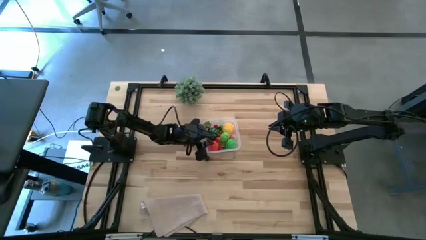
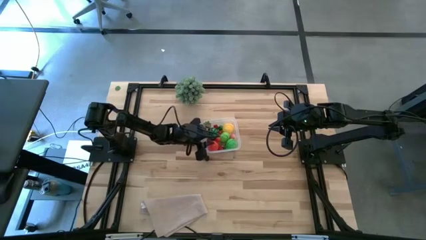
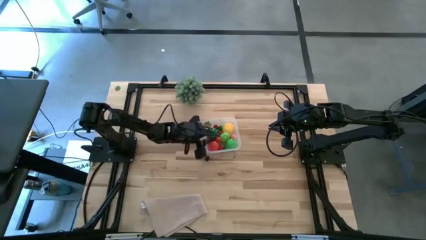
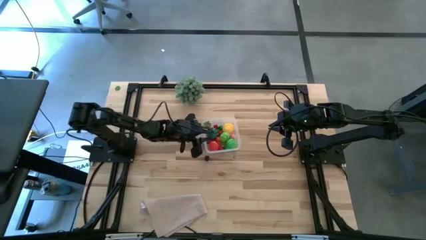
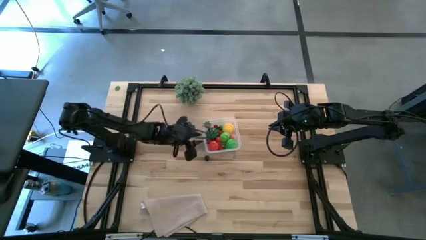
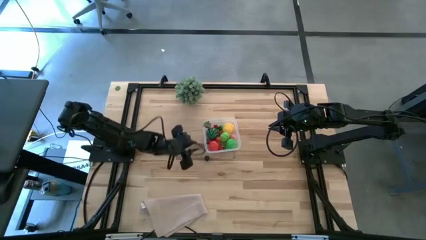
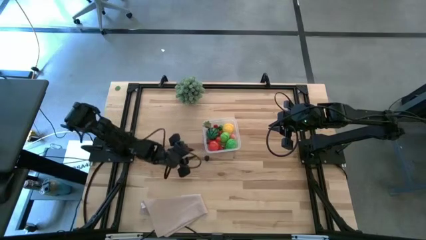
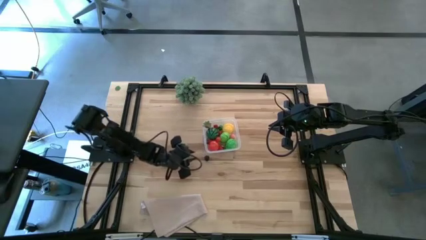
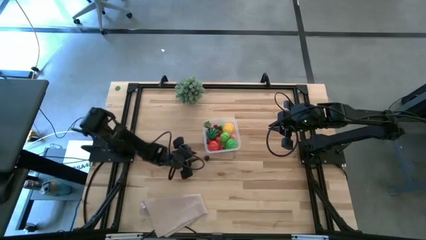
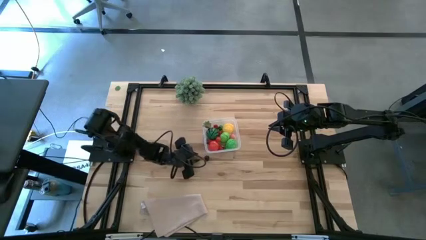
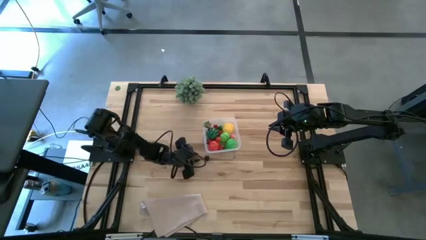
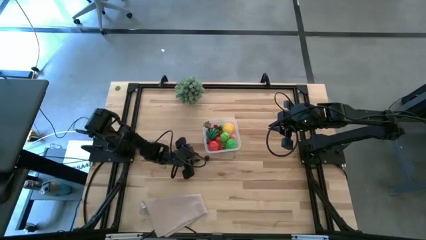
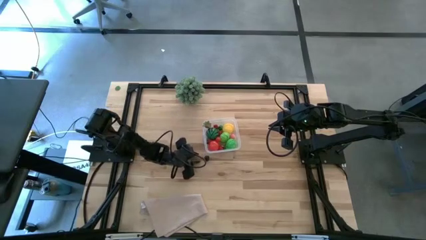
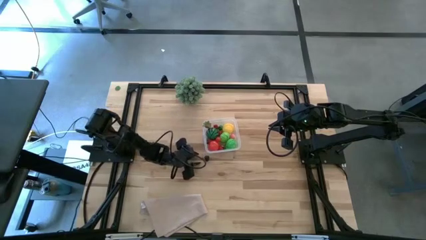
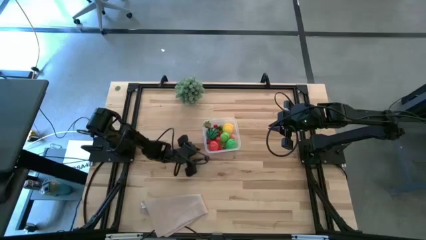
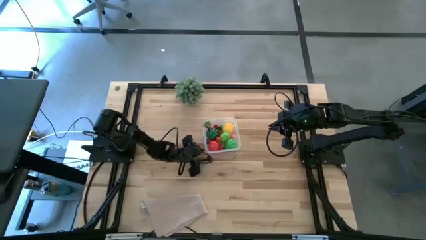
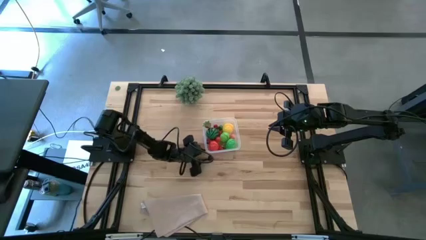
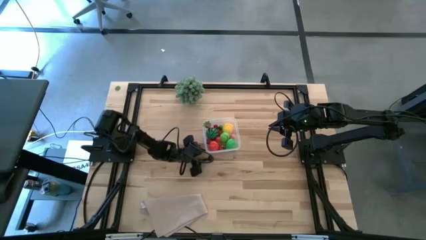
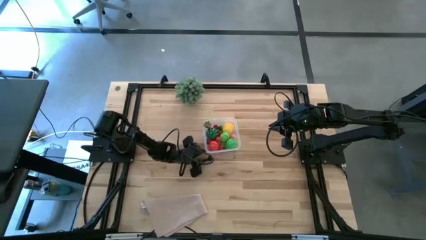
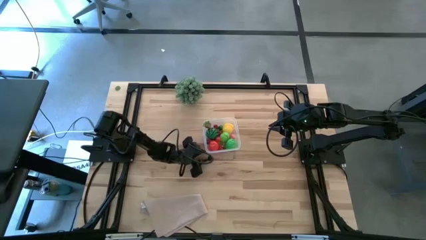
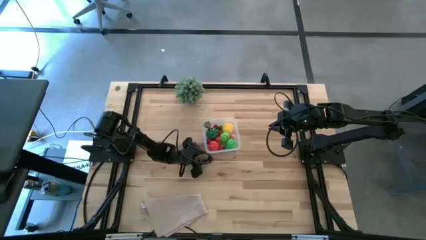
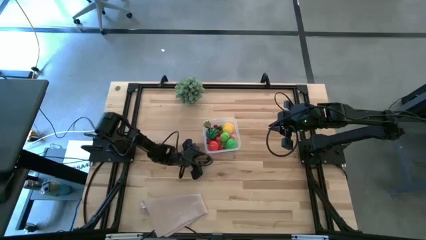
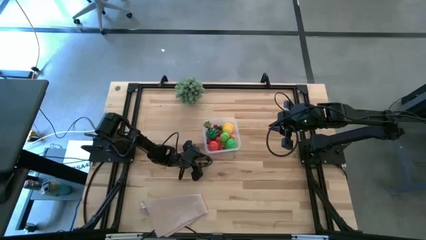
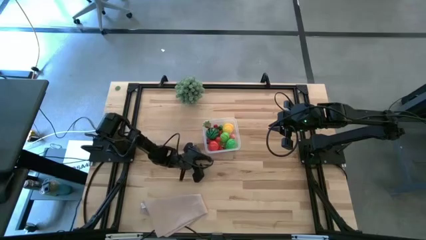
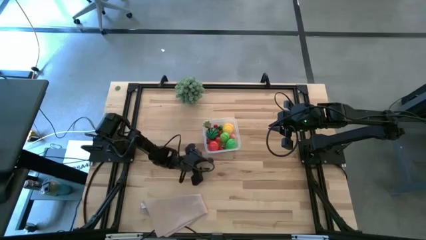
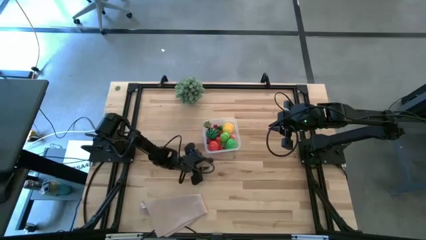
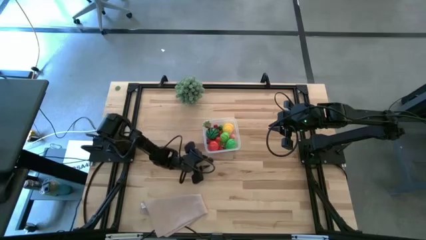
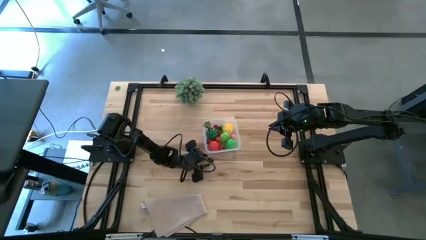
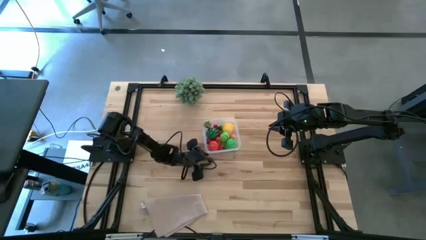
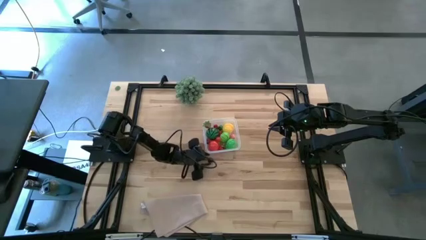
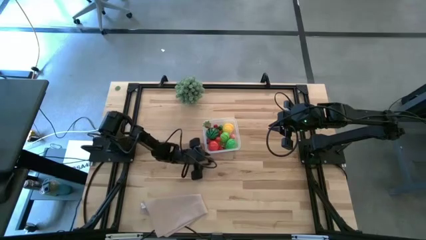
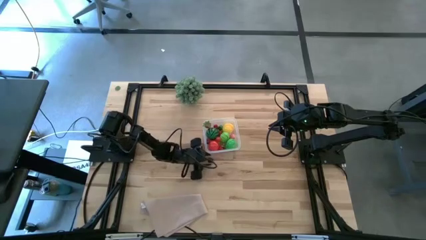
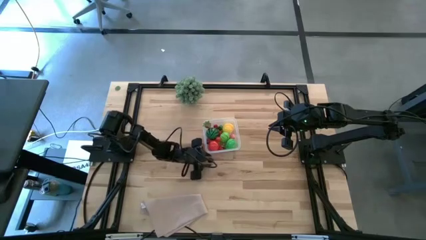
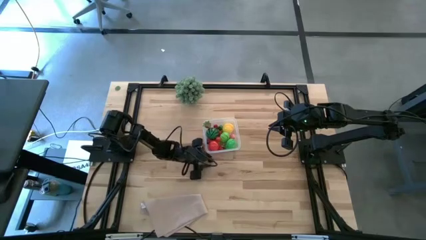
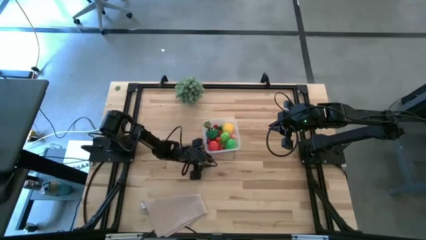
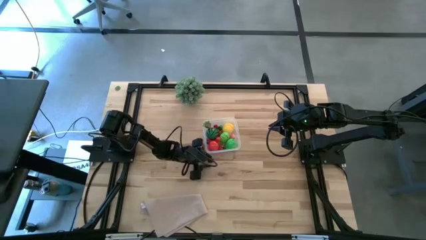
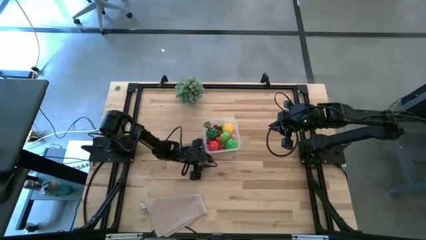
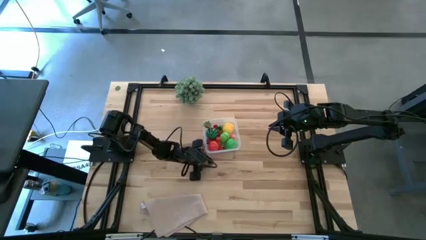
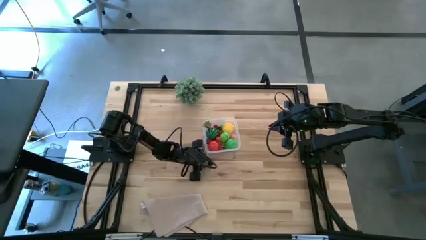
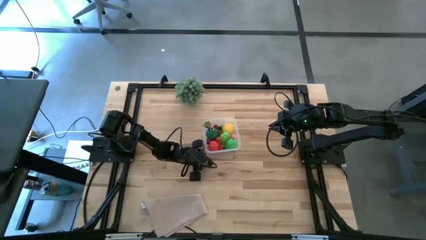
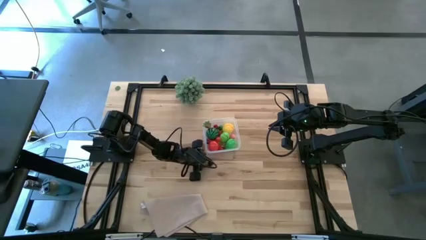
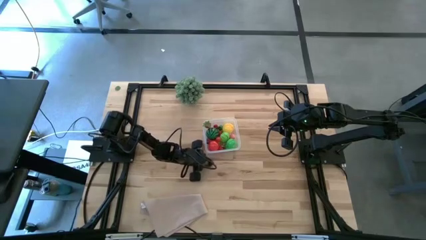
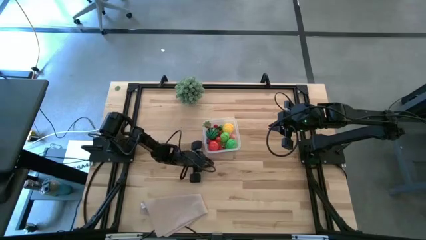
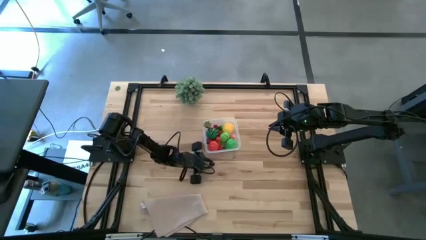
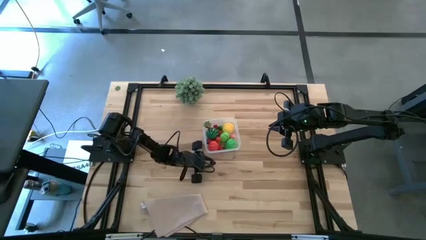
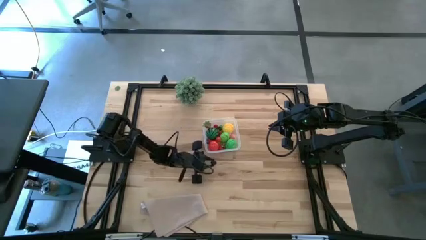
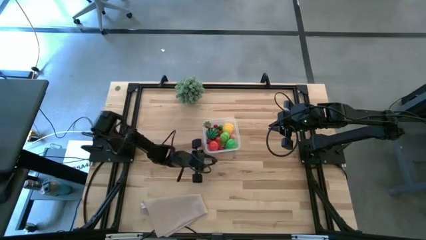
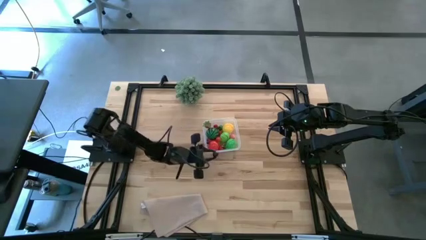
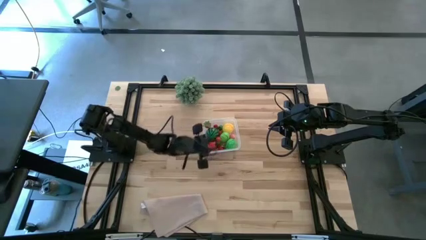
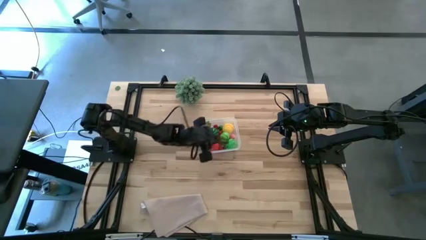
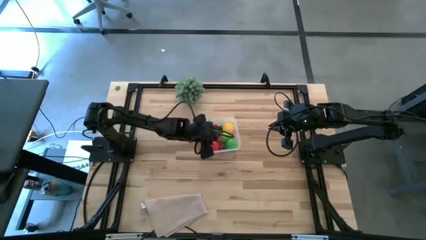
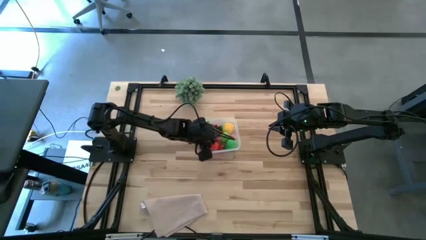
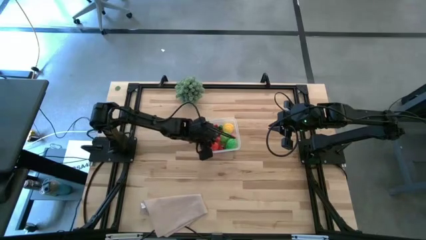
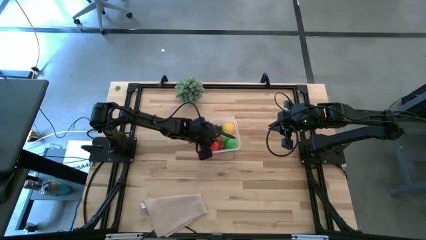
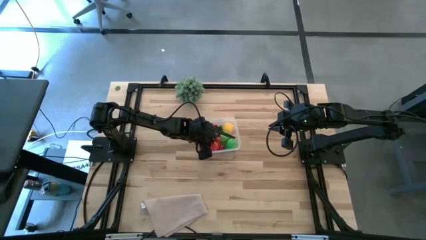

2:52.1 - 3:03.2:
Task: Pick and placing Produce into tupperware
Put the black raspberry into the transparent bin

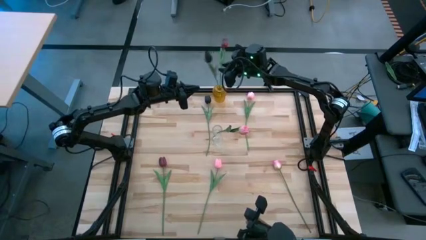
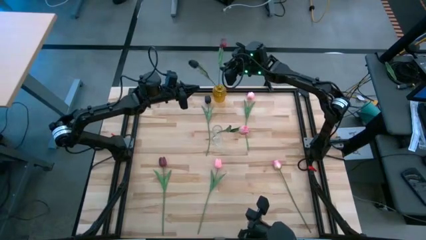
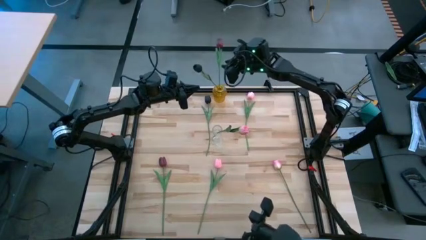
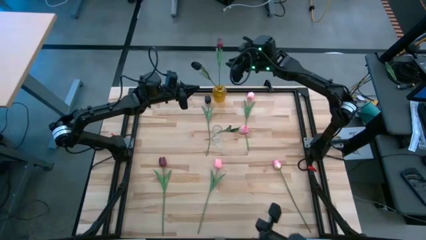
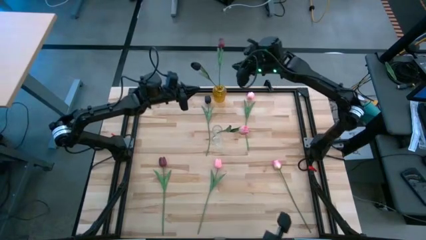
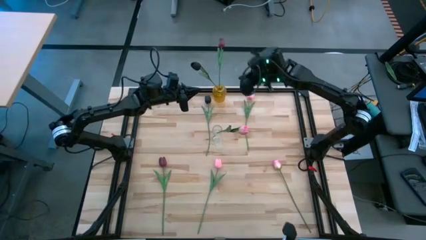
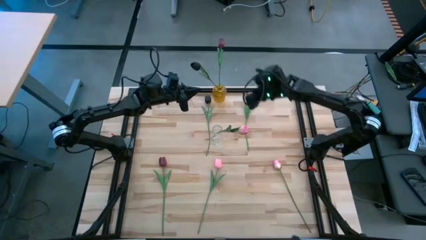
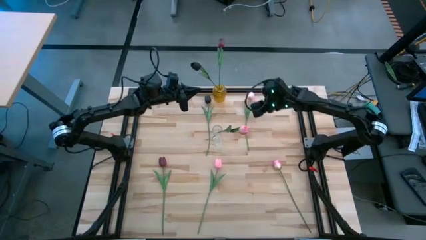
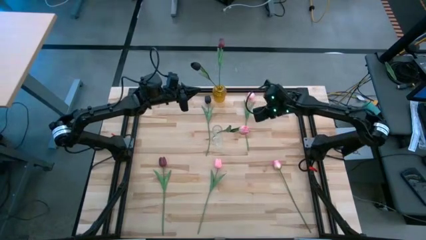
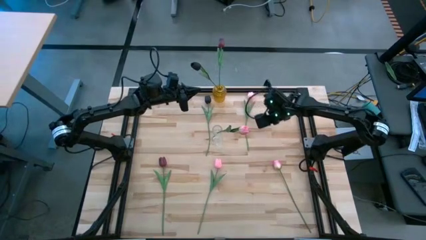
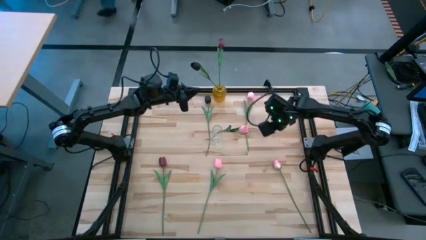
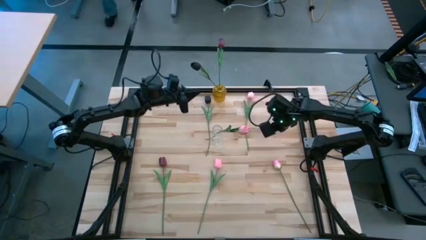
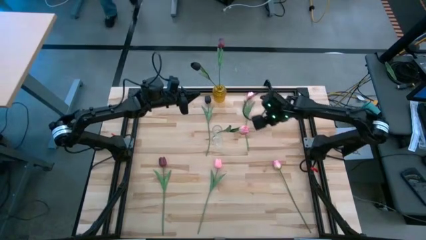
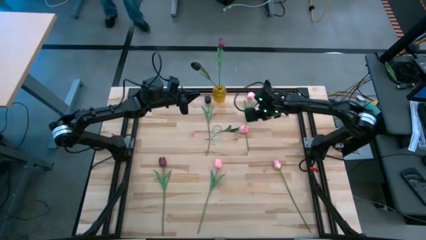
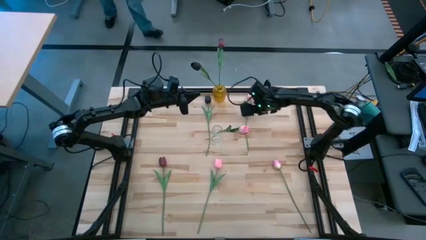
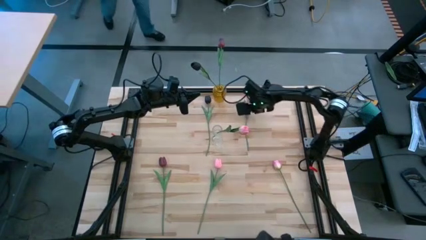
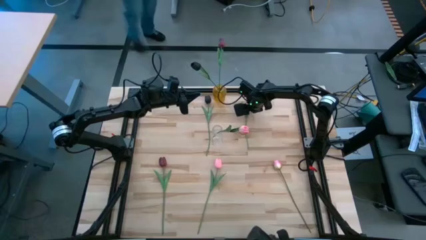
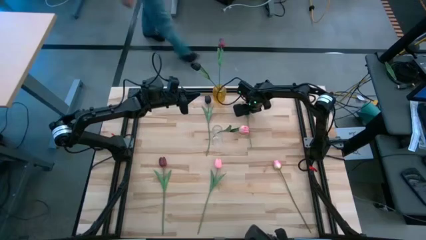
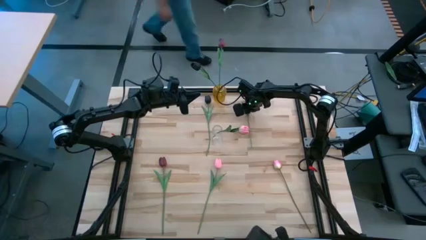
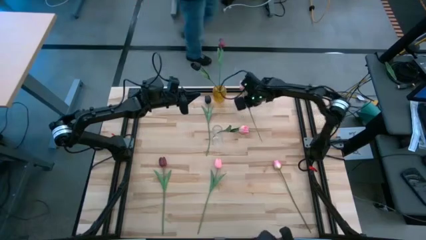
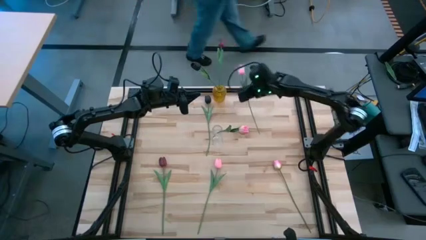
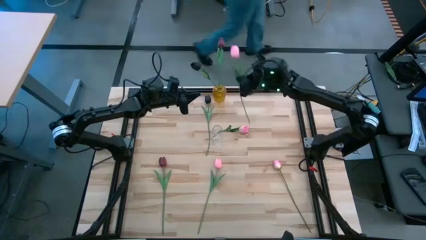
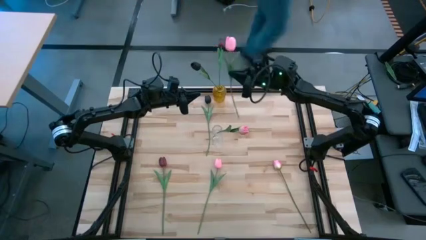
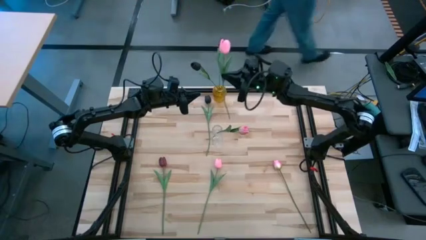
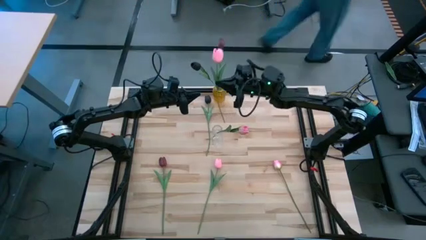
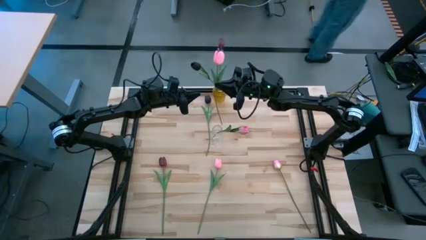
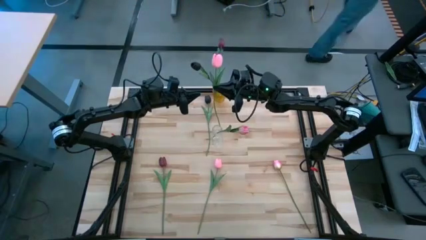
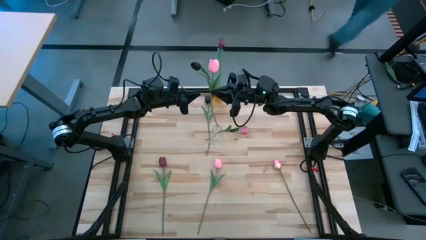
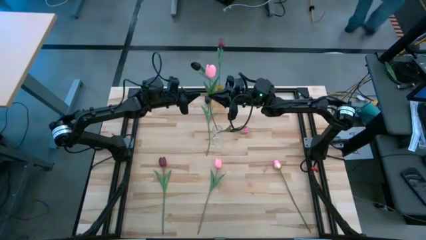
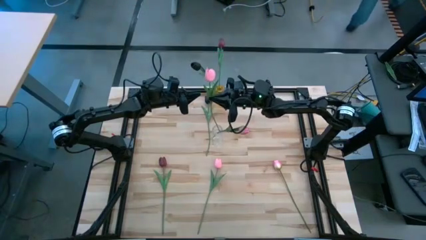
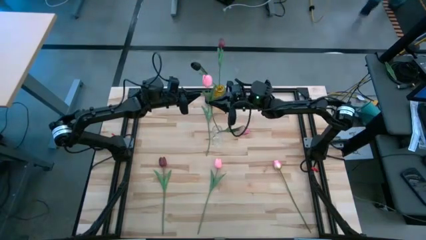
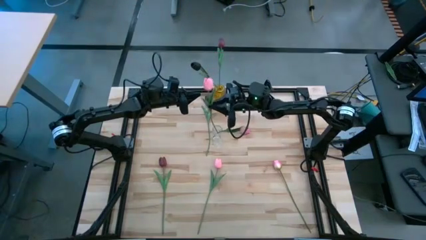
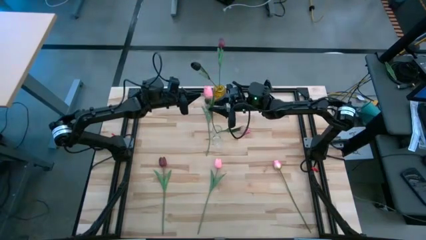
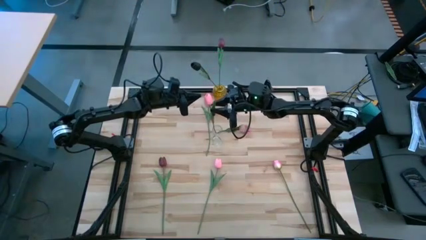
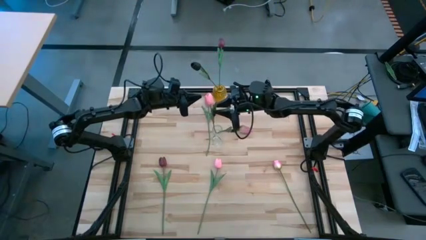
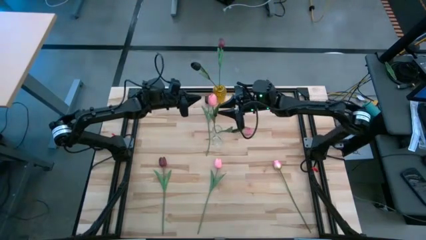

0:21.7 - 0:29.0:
Task: Sort flowers into vase by color
Put the pink flower into the transparent vase
